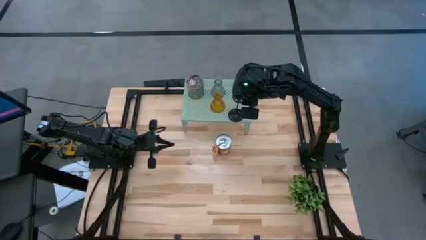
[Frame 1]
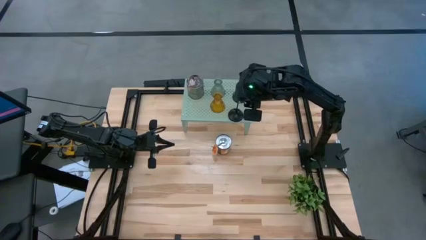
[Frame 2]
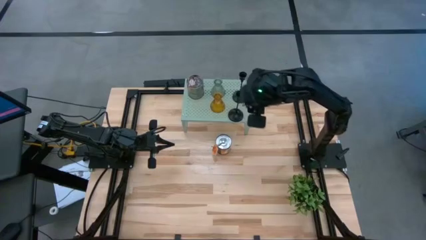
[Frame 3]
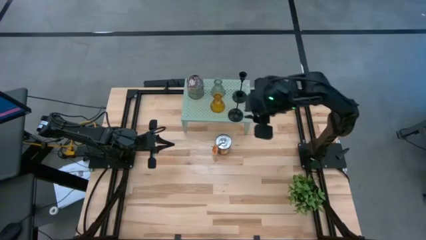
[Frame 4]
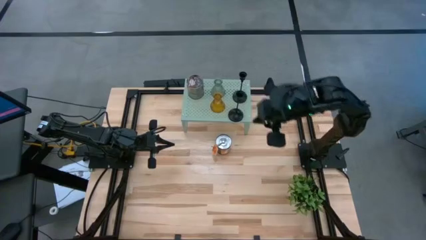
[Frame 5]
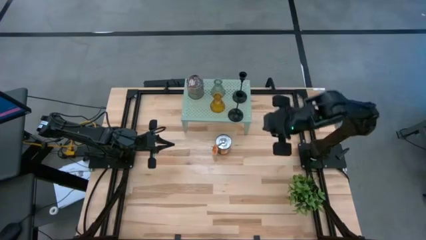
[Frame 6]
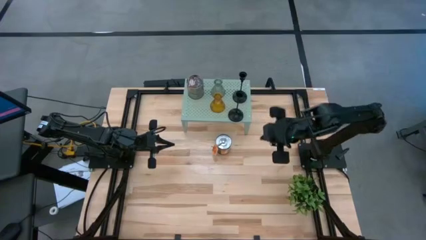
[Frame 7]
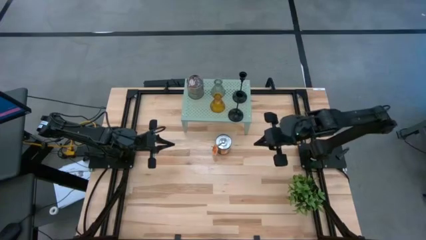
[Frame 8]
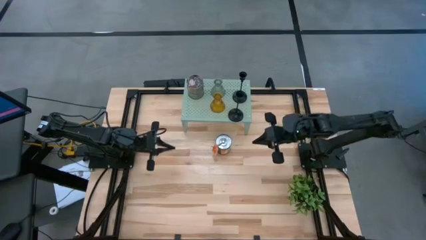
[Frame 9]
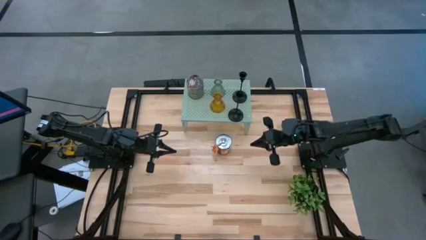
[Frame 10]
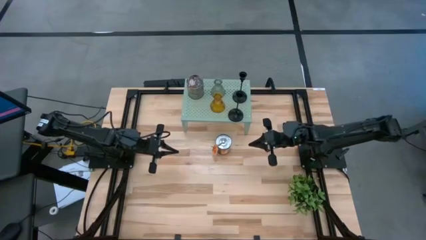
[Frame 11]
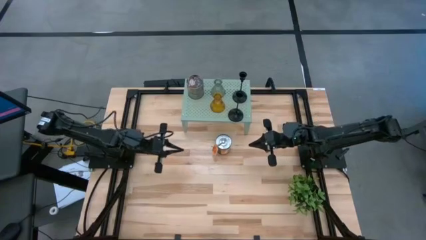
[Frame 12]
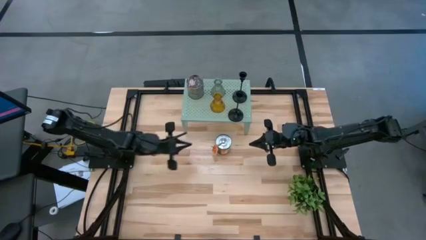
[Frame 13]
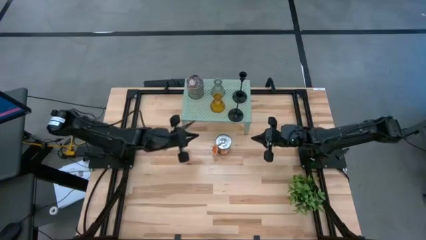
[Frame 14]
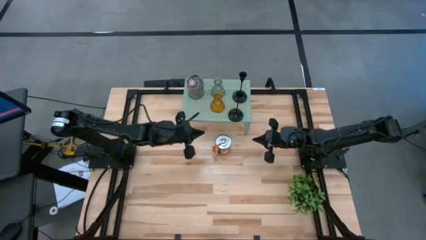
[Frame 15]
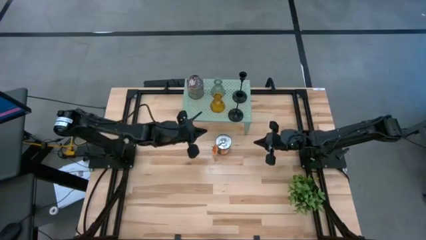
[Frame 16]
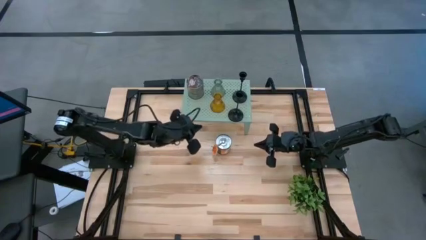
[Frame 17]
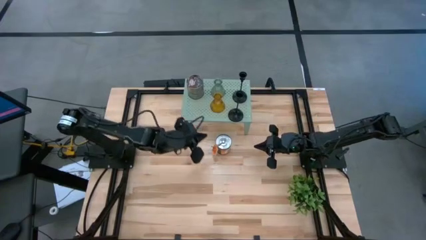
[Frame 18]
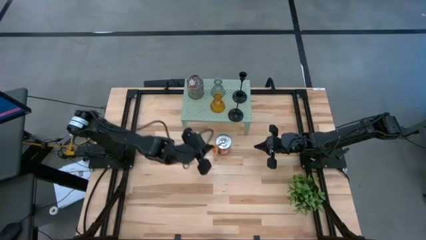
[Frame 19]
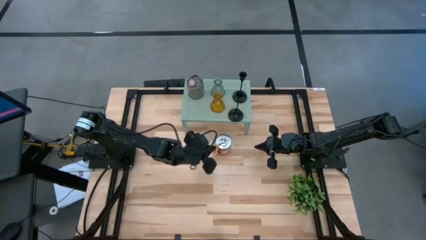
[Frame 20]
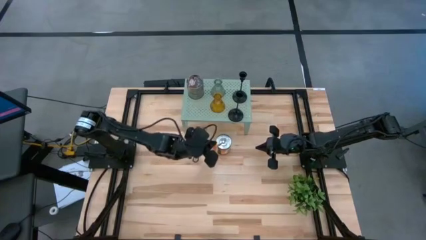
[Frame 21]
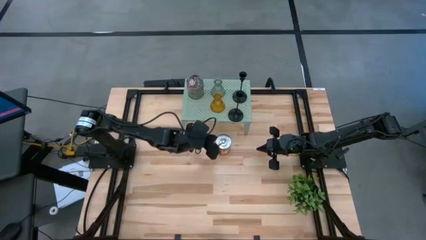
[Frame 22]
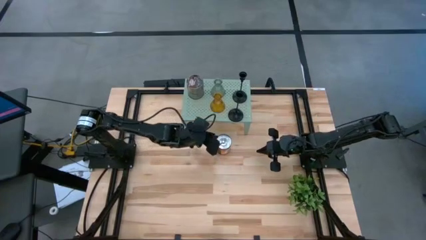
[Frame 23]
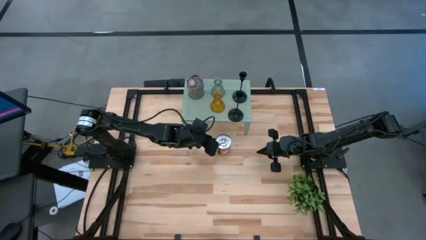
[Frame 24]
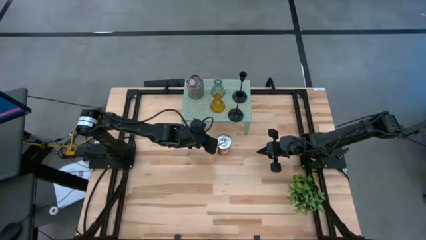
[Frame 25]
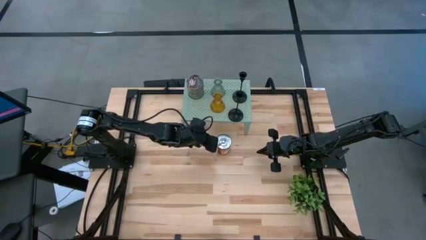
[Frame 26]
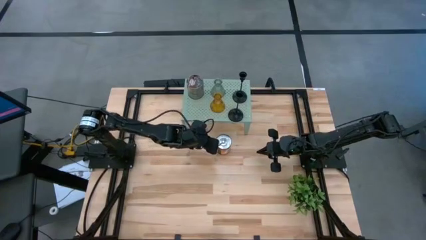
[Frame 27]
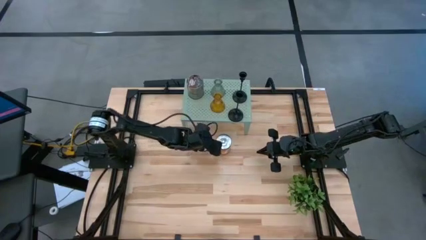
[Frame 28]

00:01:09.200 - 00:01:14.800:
Task: Pick & Place candle stick holders
Put the silver scented candle on the shelf

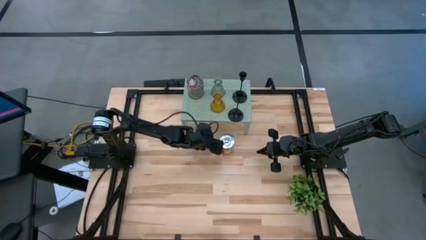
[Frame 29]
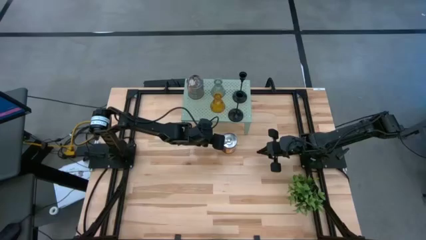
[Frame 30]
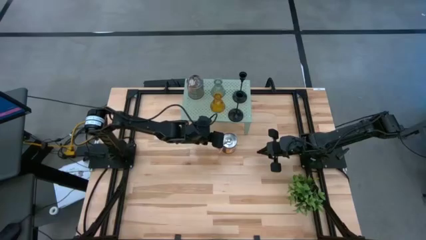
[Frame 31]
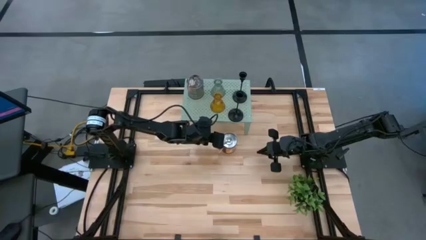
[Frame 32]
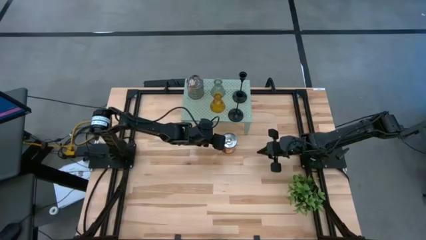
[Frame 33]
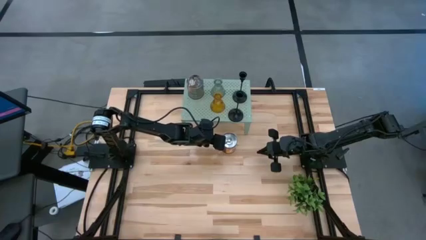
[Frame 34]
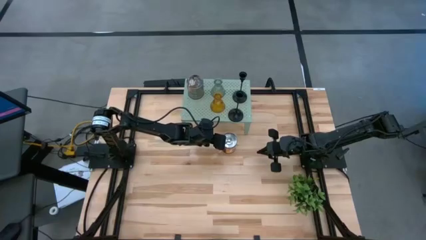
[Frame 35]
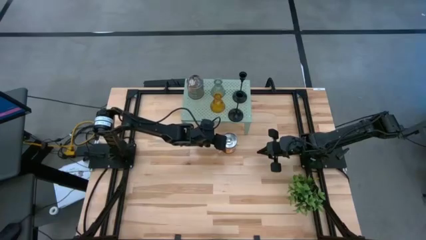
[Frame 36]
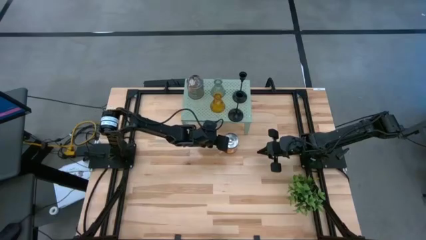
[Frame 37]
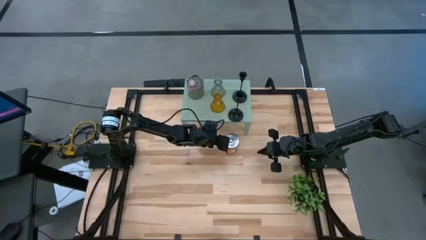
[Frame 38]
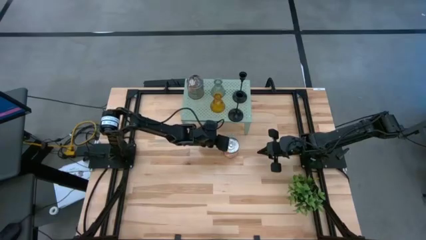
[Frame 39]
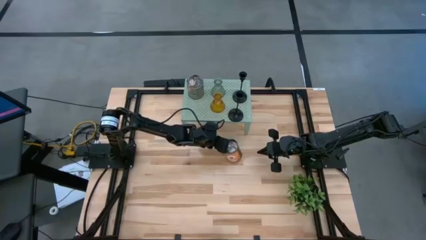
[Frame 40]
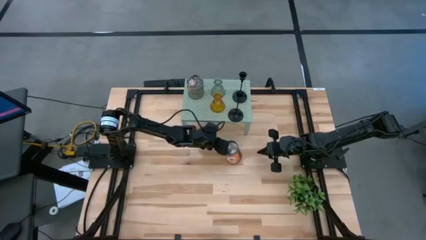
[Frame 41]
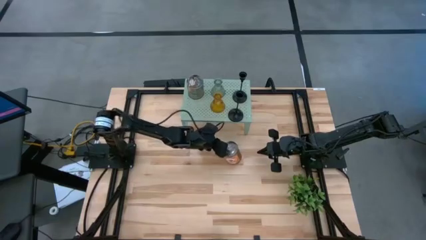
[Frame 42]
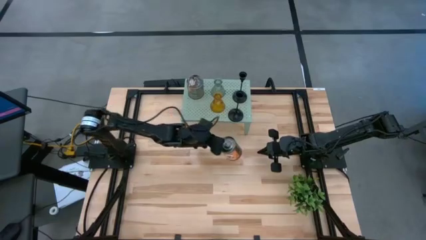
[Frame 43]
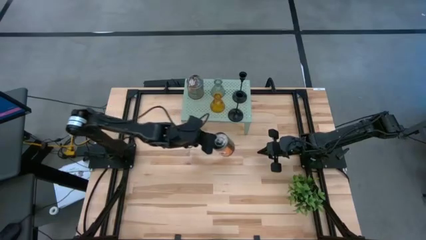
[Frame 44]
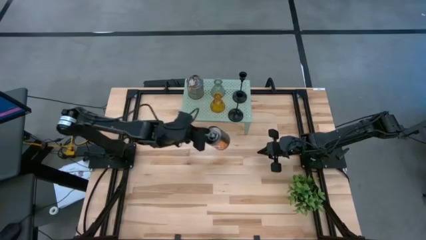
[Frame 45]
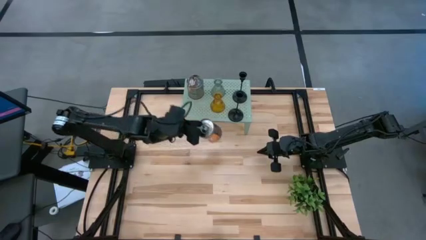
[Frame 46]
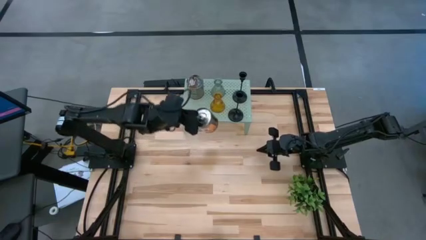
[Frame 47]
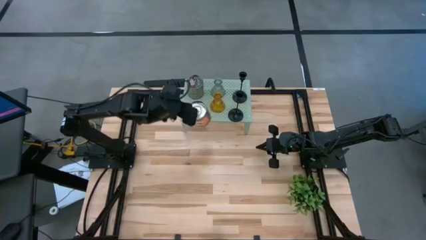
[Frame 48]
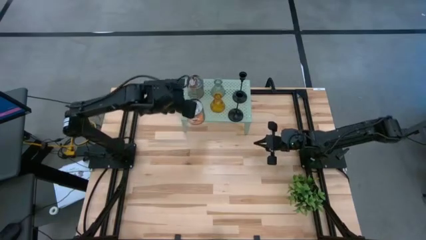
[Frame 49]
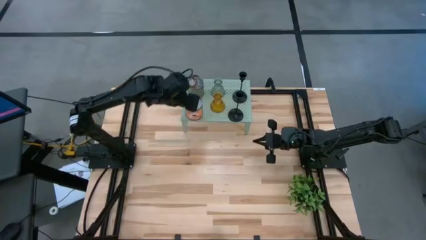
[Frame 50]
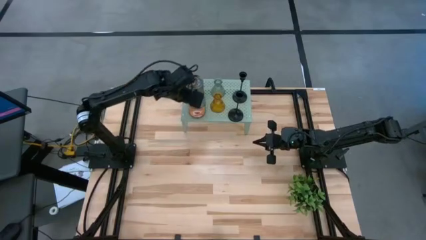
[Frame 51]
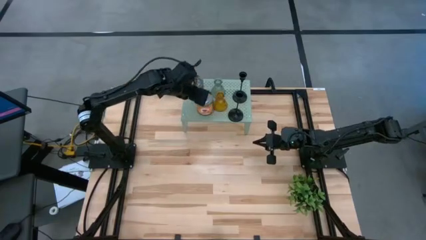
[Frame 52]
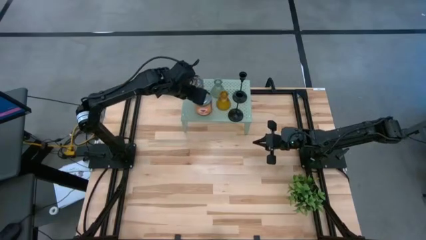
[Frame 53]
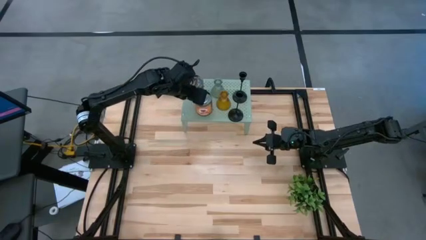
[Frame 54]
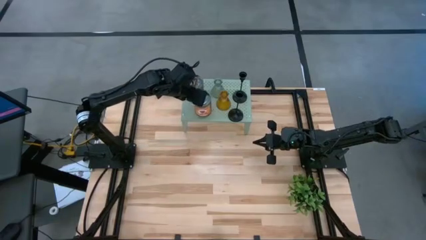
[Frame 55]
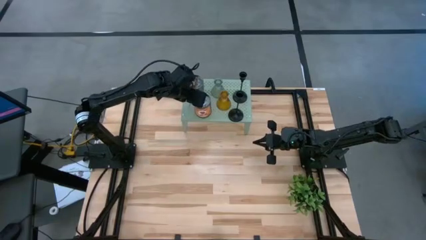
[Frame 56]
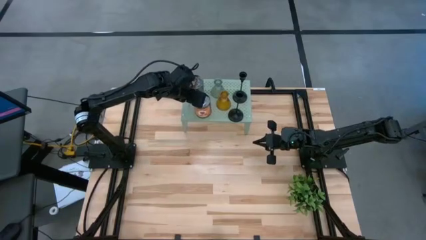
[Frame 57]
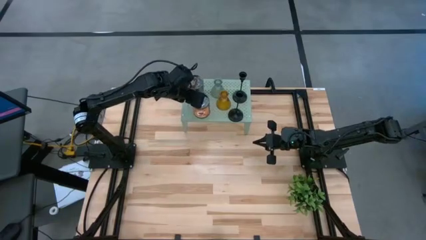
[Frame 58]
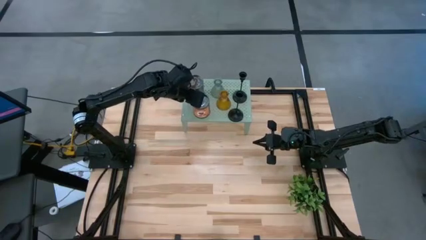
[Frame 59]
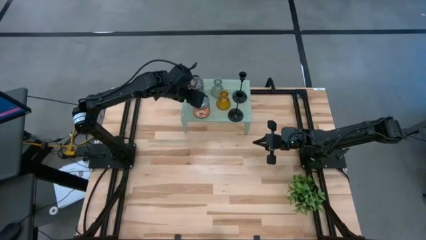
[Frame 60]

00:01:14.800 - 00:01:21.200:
Put the silver scented candle on the shelf

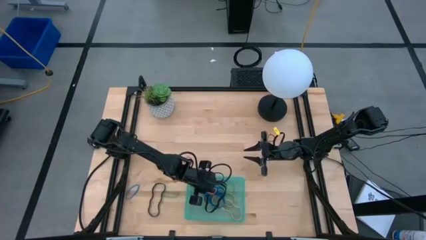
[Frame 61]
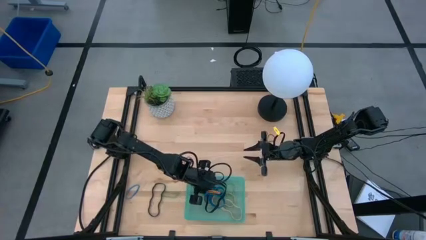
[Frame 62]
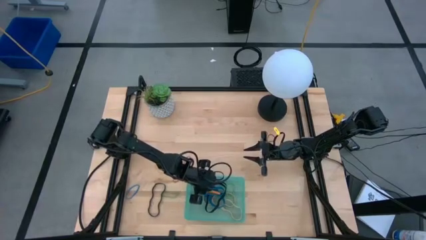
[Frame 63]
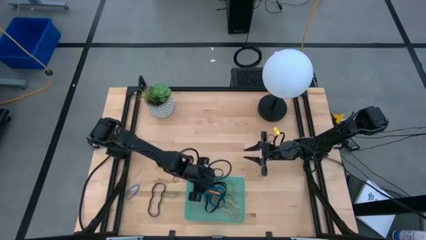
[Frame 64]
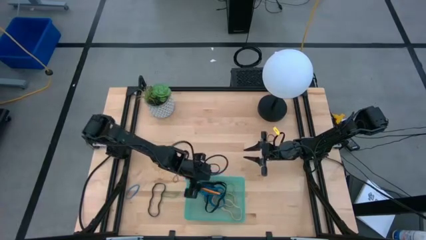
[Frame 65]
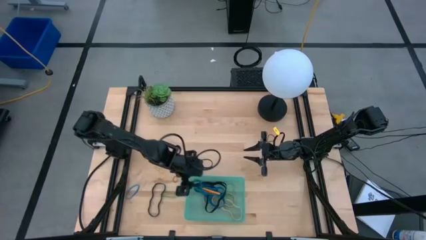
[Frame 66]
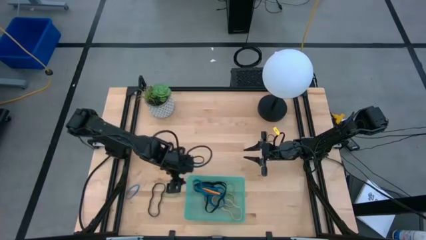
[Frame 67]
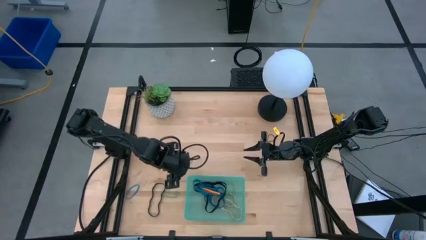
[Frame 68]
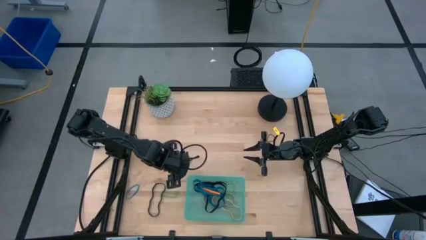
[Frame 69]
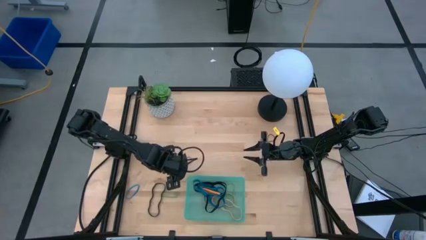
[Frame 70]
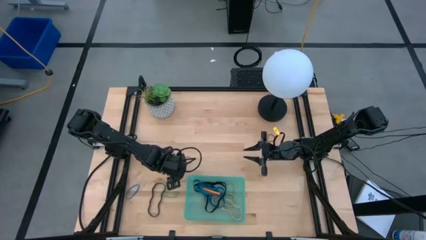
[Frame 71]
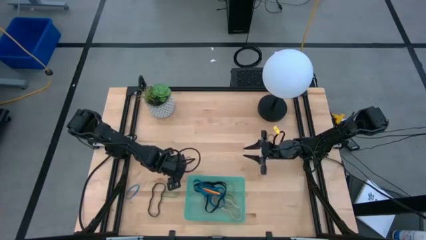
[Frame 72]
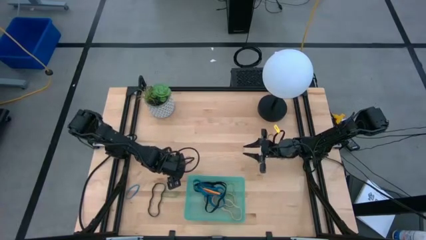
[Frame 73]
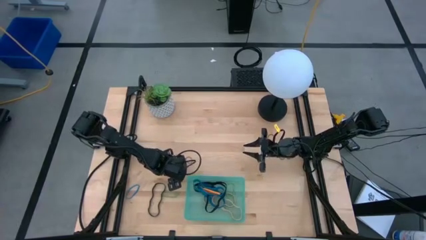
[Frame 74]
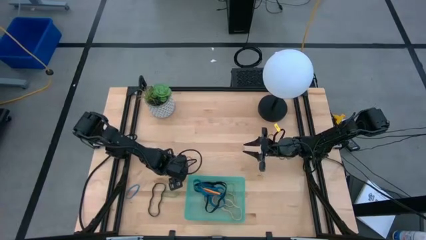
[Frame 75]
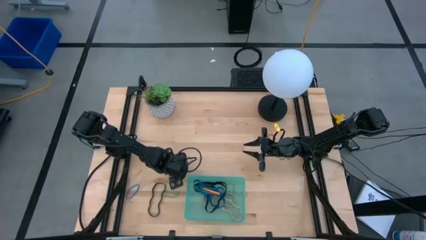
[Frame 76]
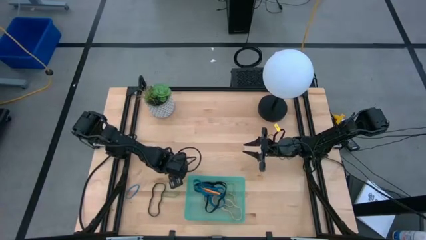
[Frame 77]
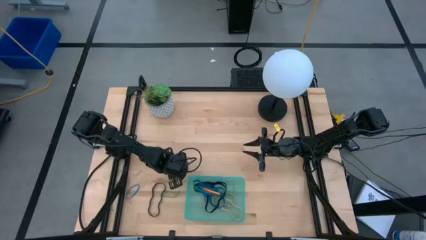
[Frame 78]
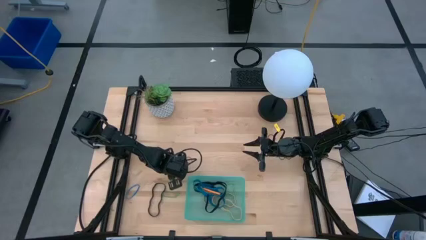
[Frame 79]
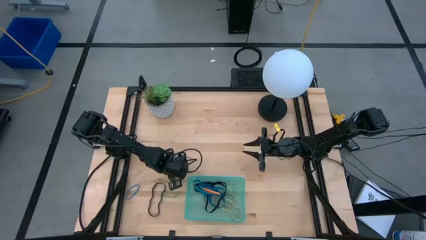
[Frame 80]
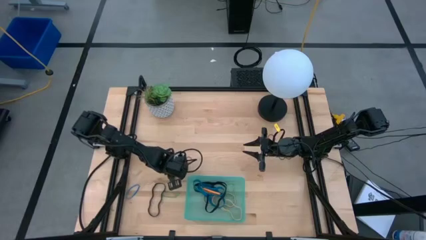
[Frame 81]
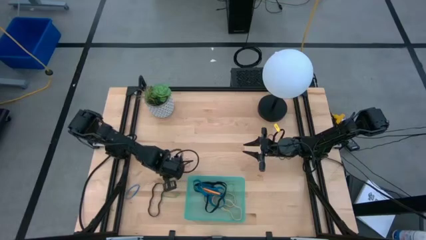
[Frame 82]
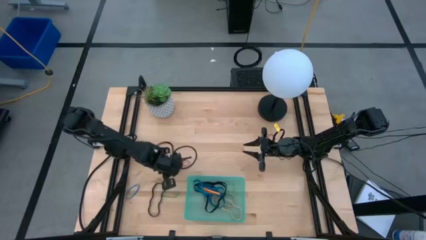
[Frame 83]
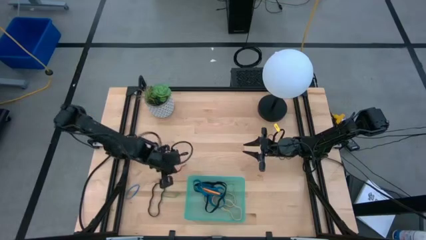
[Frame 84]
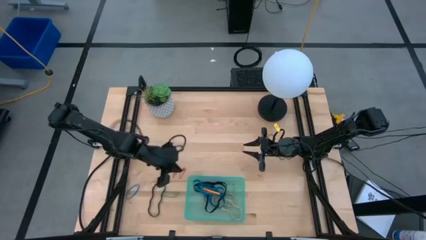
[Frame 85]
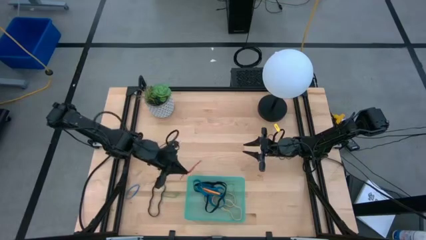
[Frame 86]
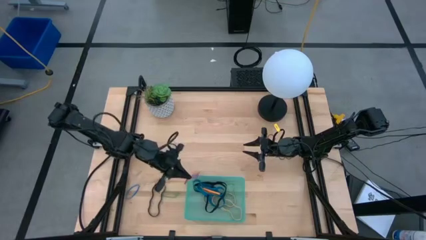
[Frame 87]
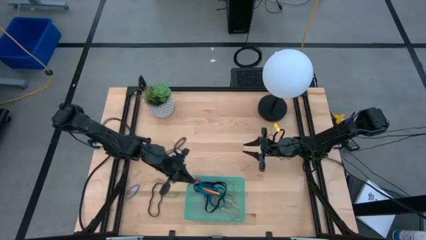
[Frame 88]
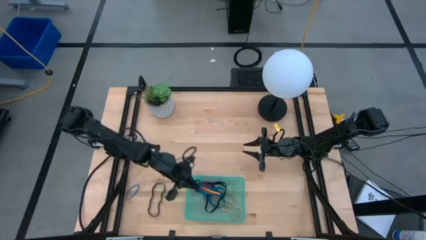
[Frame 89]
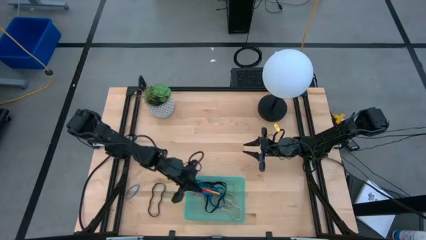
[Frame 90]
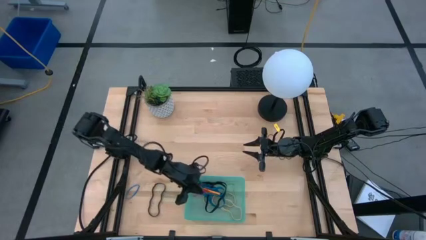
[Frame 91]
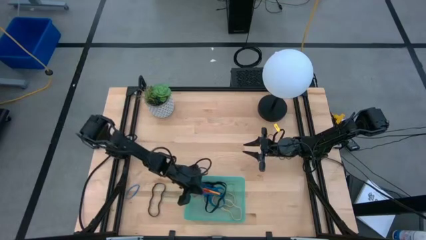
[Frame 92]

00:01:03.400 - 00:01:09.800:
Task: Pick and place rubber bands into bin
Put the small red rubberband into the green bin
